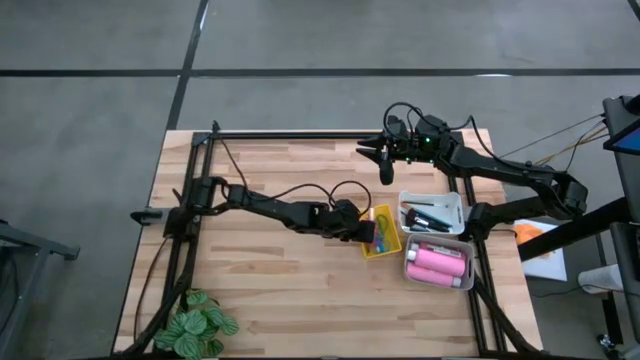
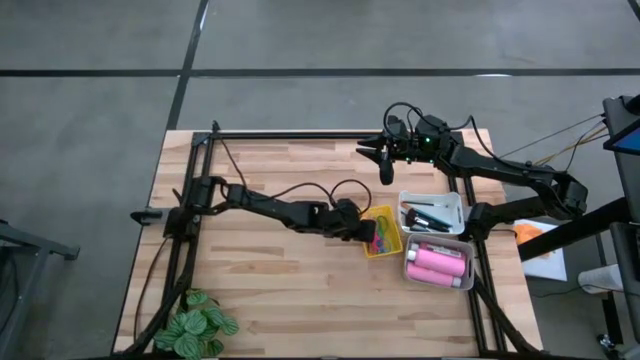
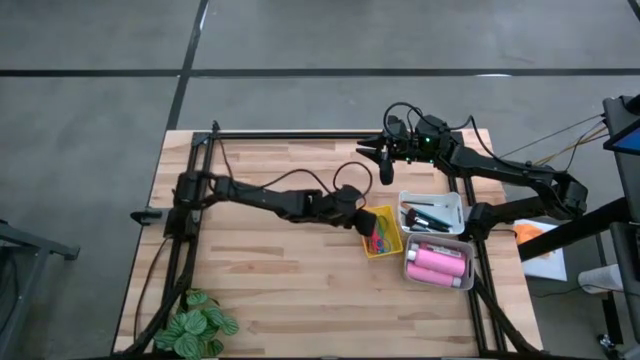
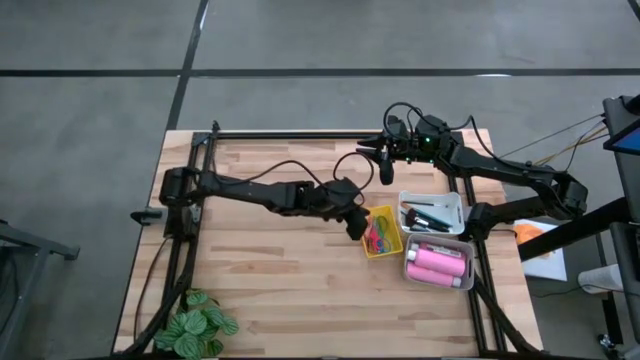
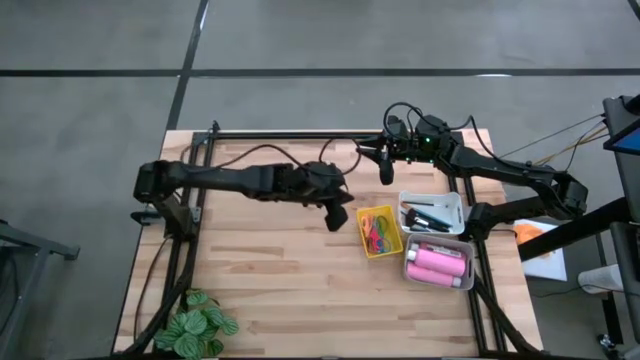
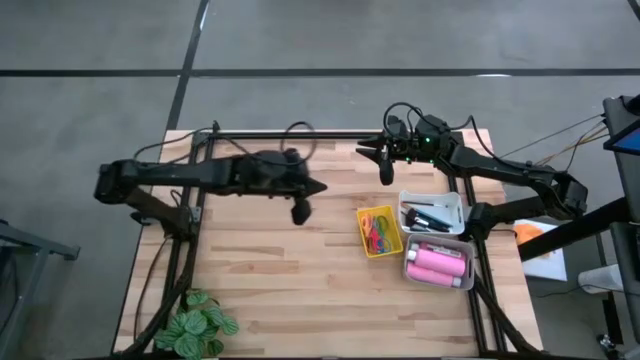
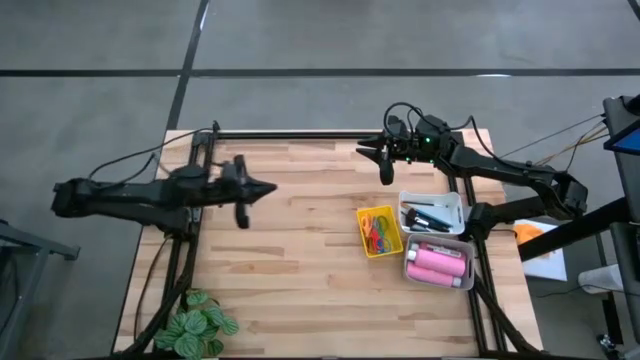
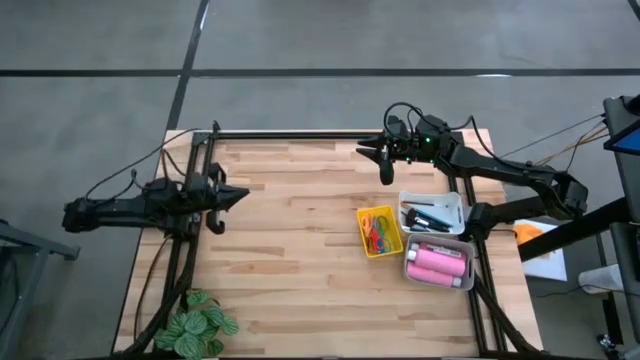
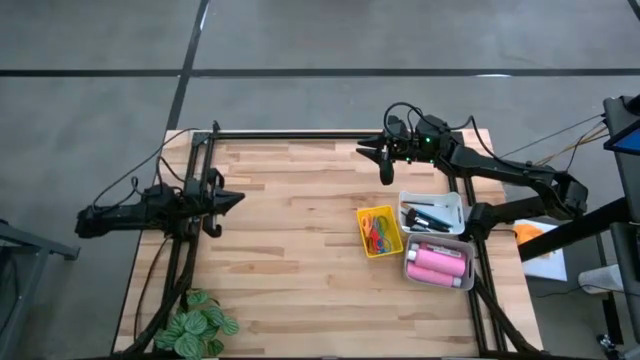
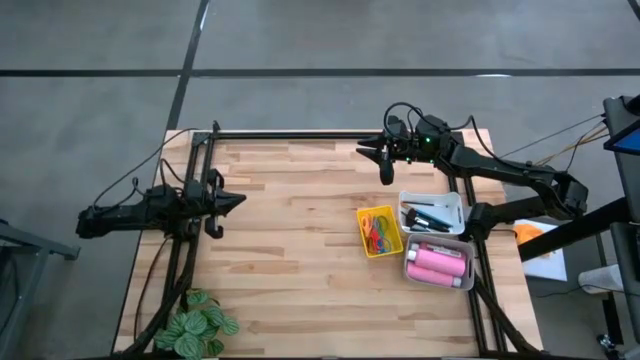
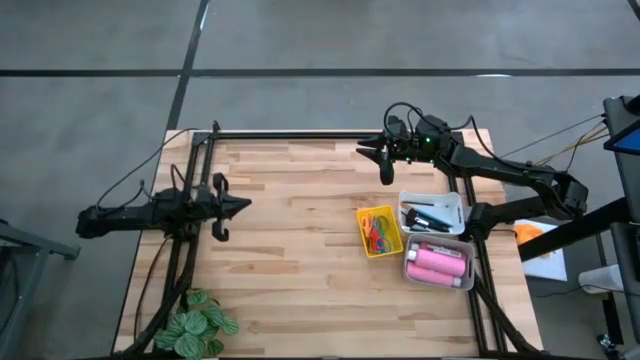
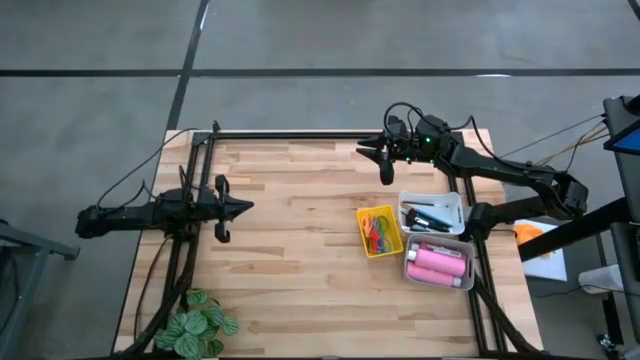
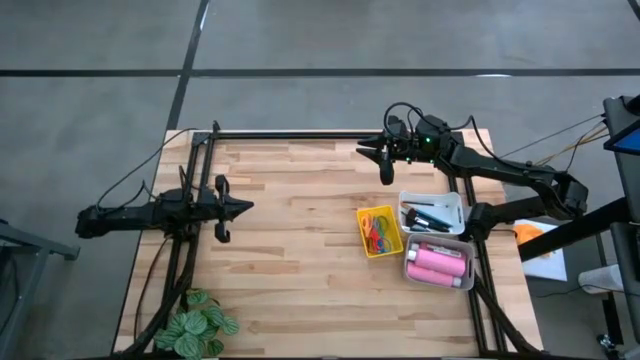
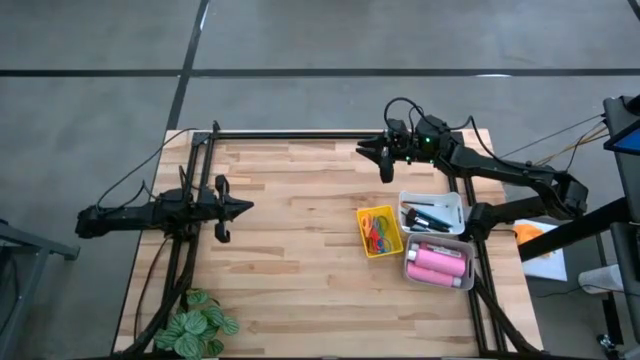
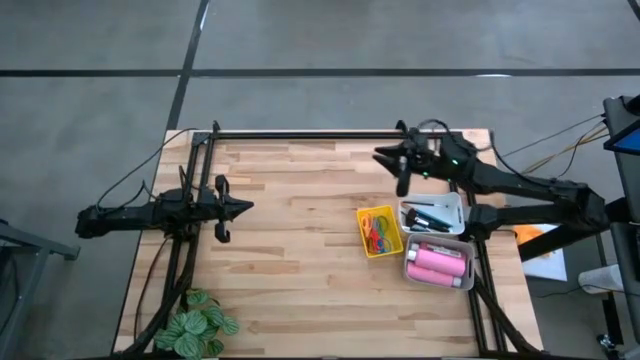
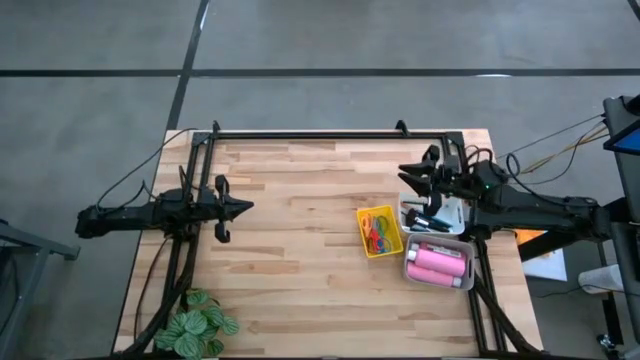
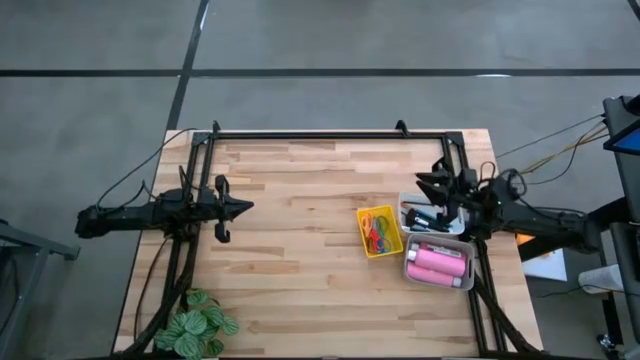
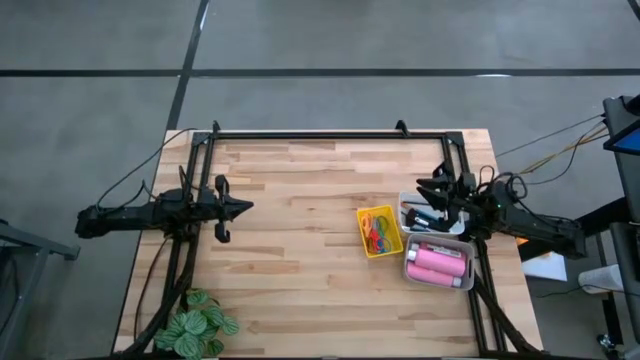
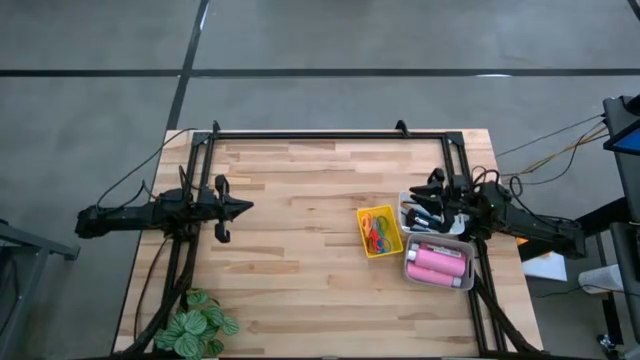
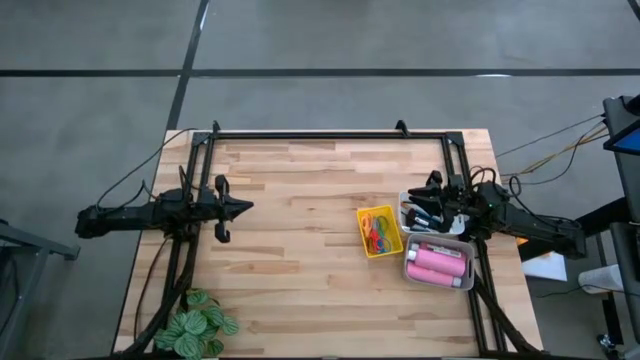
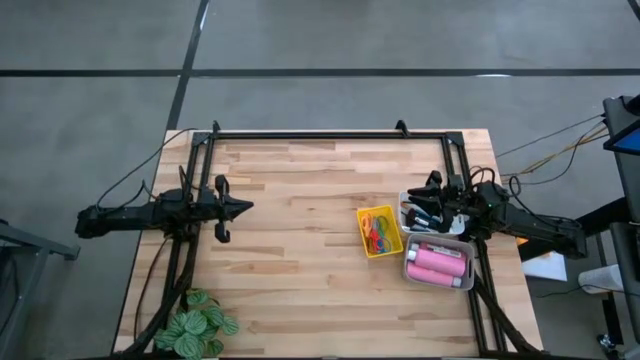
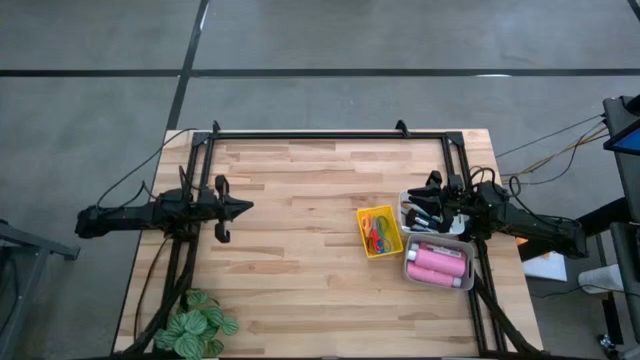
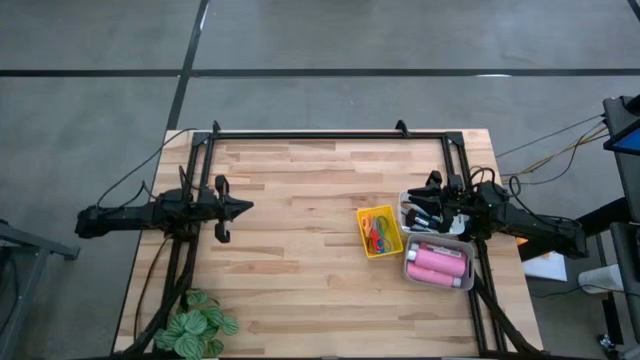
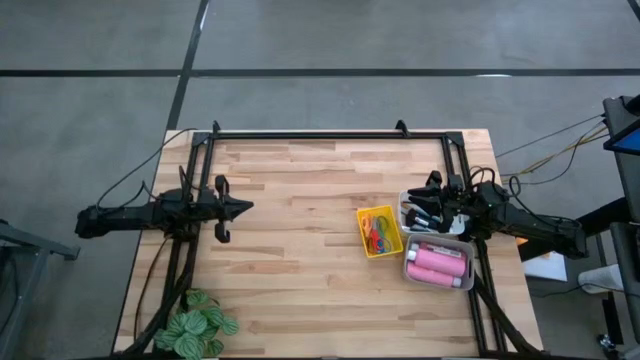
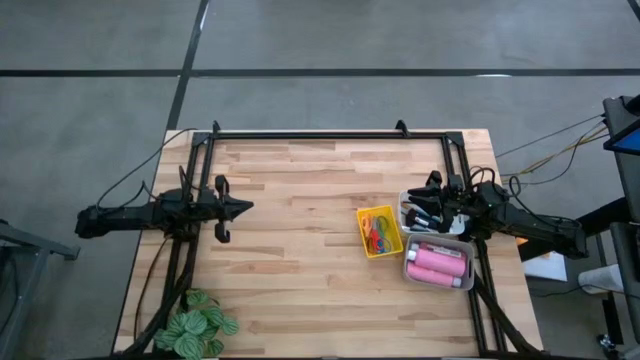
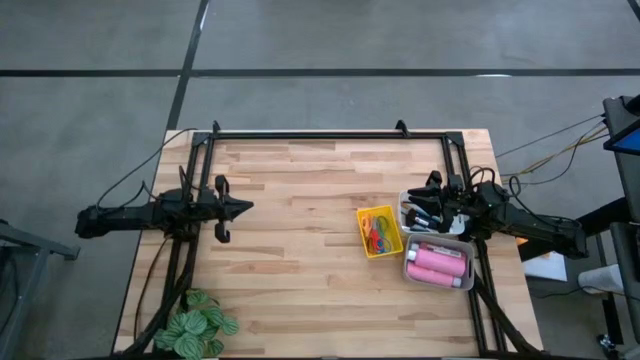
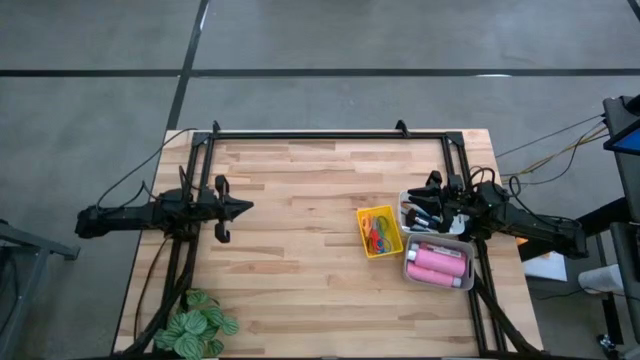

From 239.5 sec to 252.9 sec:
Task: Pick & Place Paint Supplies
Return to Home Position

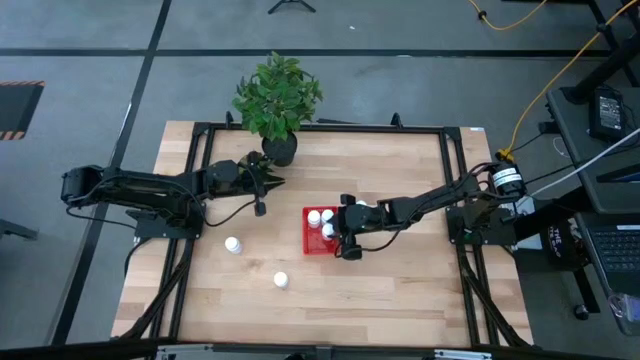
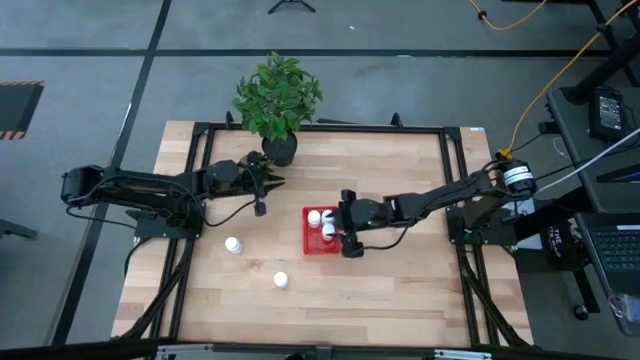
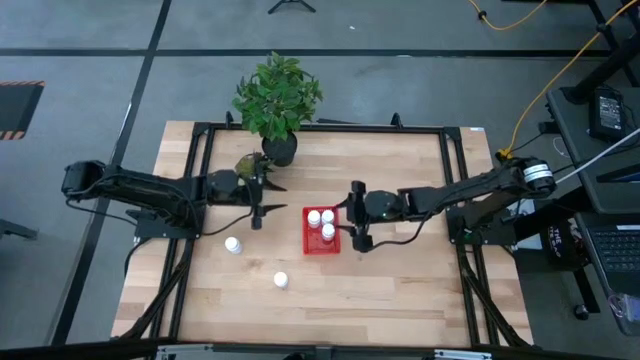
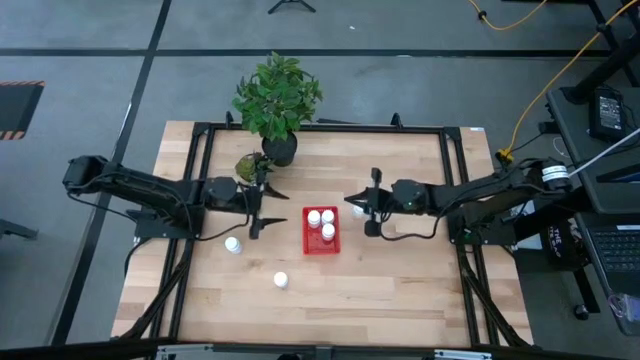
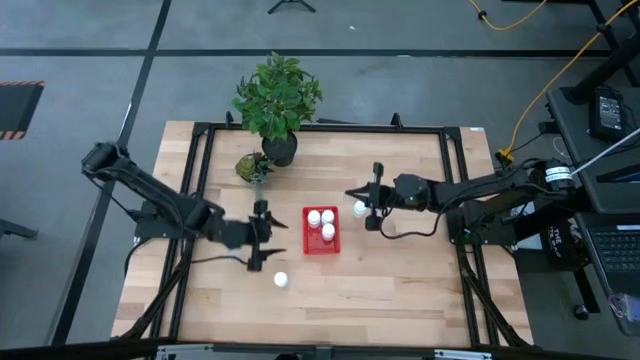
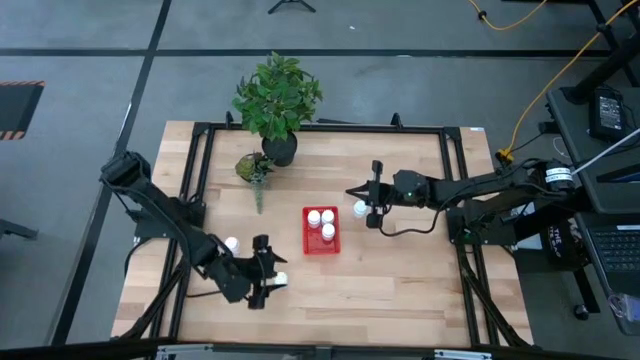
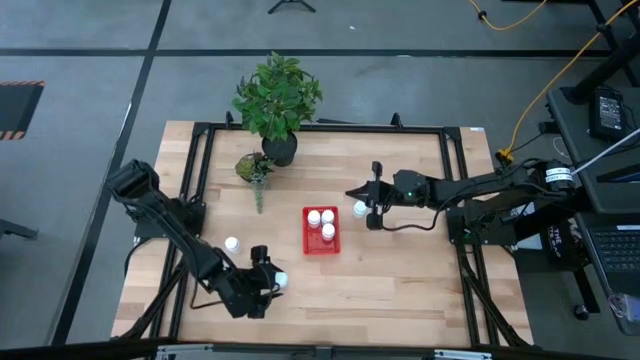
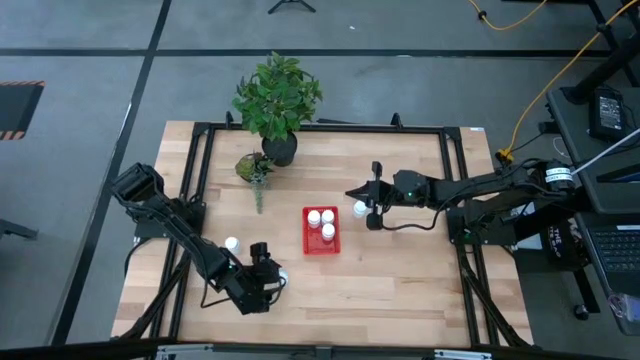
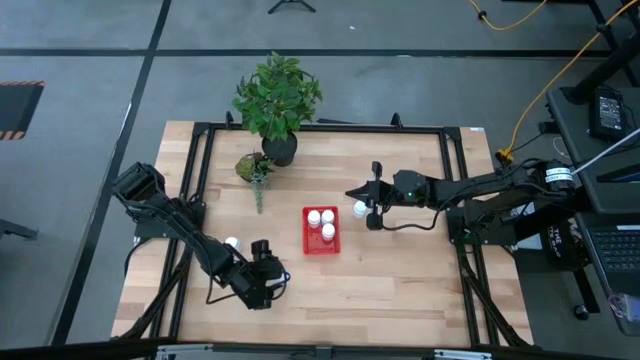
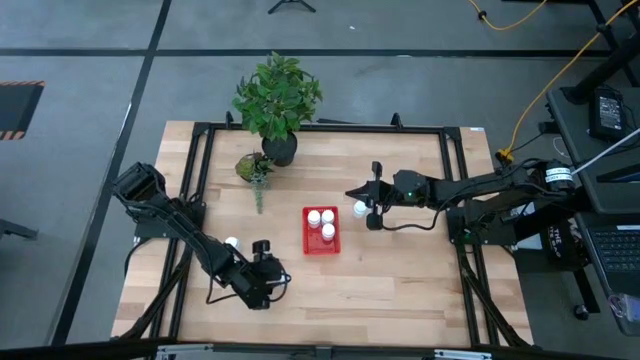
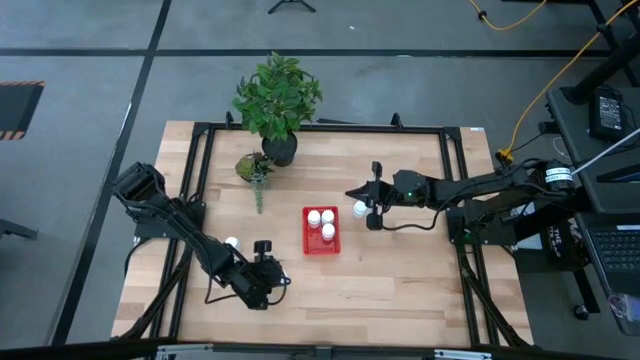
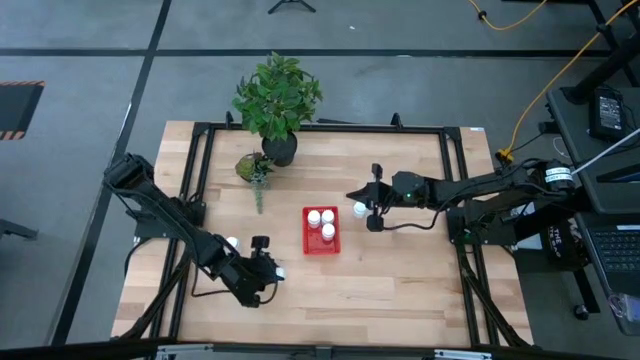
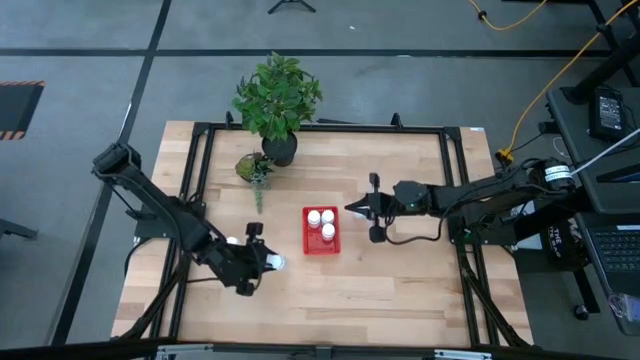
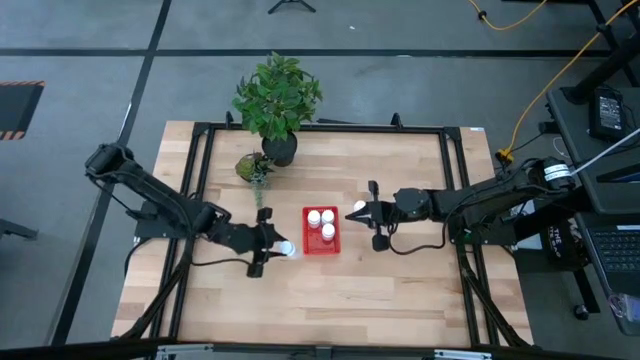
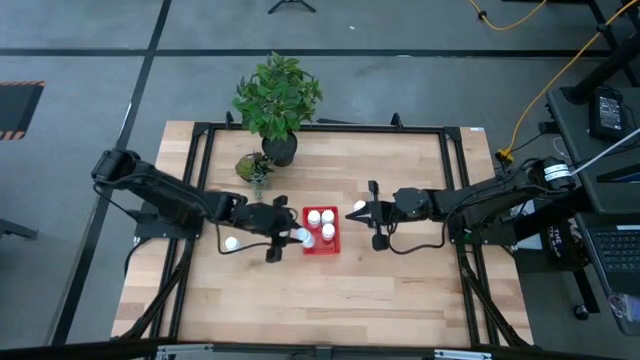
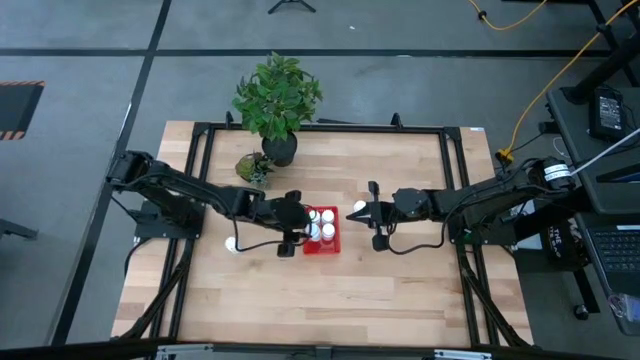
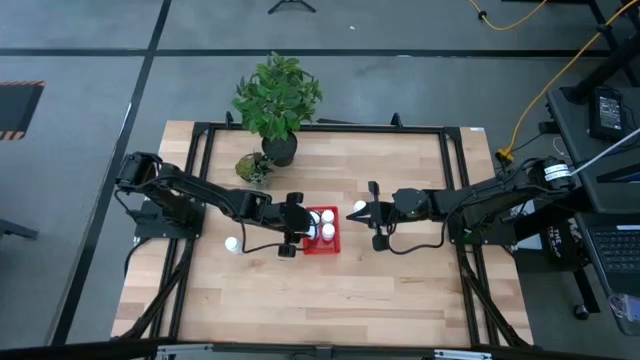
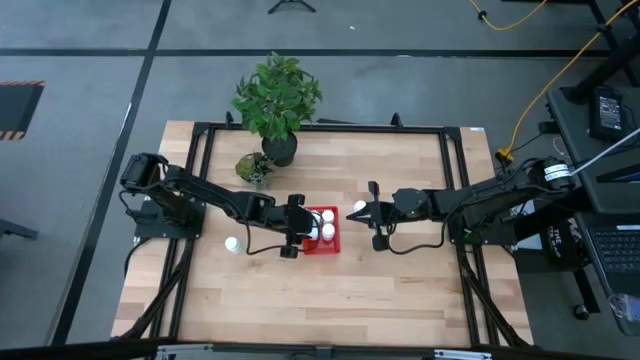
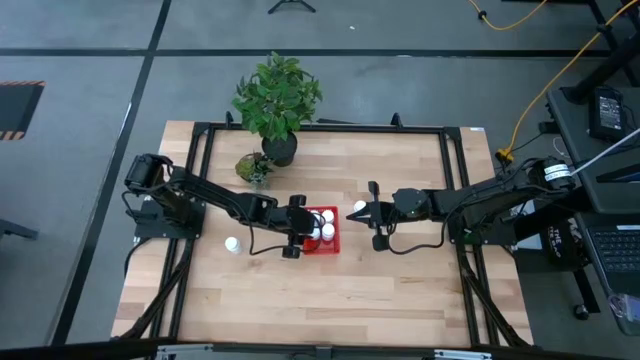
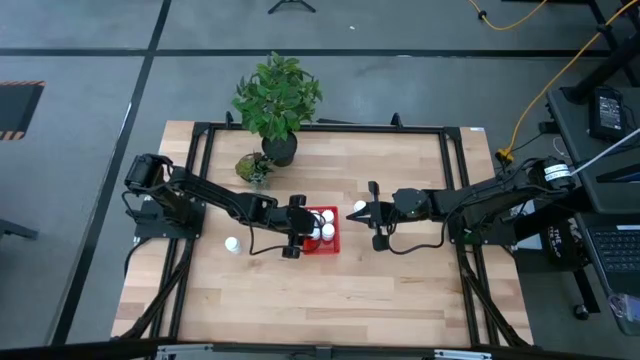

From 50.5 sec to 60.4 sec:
Task: Pick and place pill bottles into a basket
Put the white medicine bottle into the red bin
